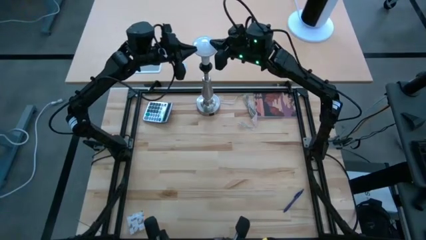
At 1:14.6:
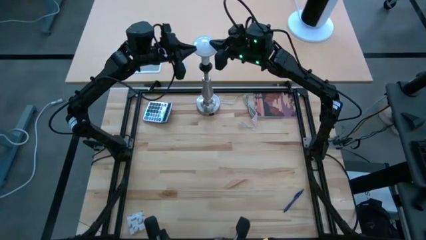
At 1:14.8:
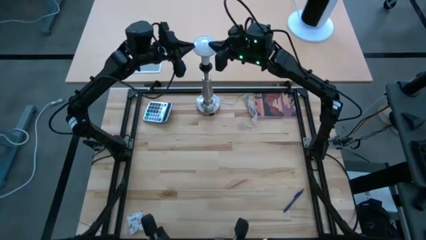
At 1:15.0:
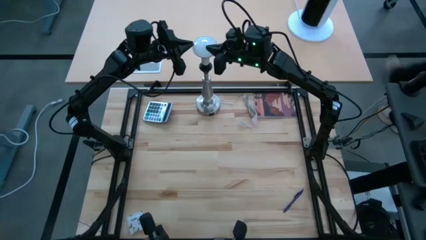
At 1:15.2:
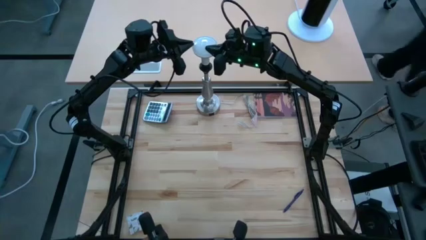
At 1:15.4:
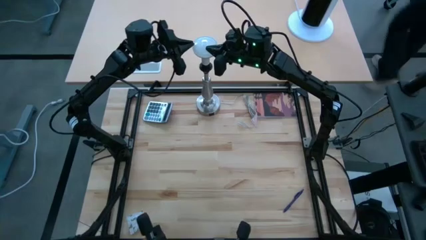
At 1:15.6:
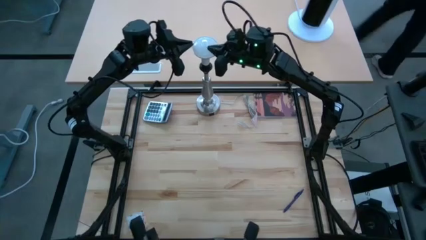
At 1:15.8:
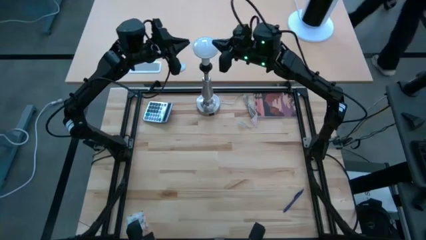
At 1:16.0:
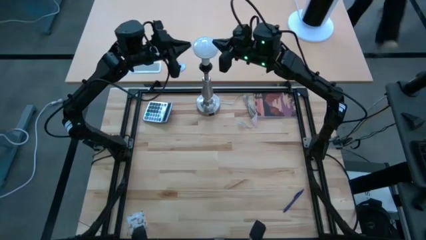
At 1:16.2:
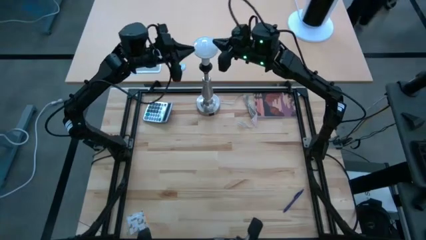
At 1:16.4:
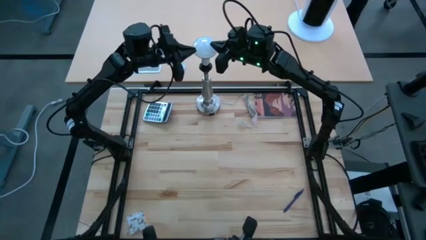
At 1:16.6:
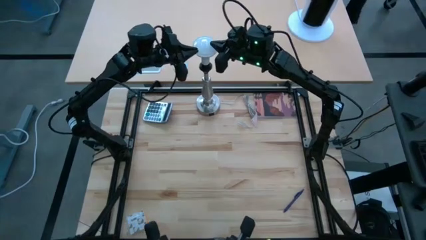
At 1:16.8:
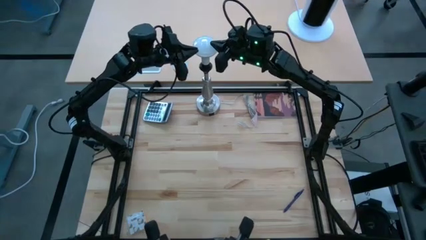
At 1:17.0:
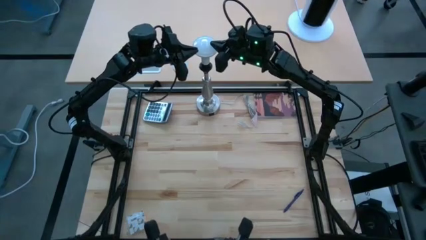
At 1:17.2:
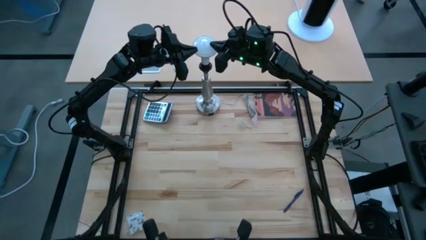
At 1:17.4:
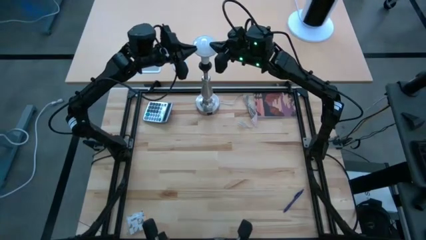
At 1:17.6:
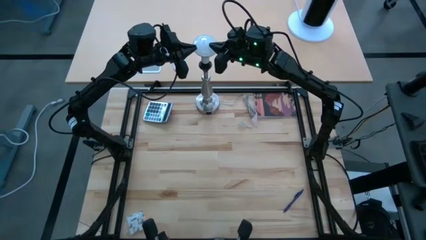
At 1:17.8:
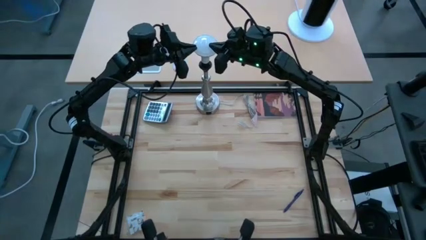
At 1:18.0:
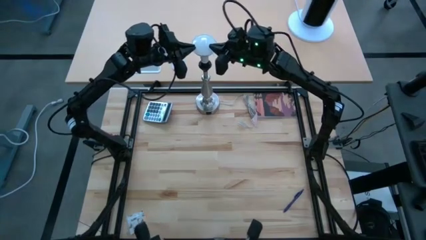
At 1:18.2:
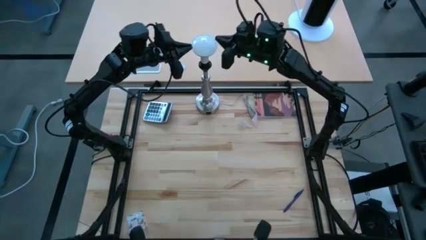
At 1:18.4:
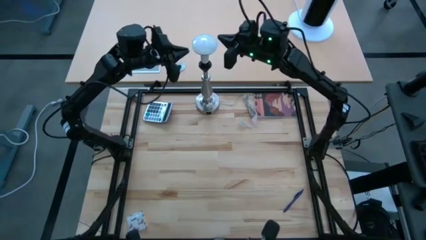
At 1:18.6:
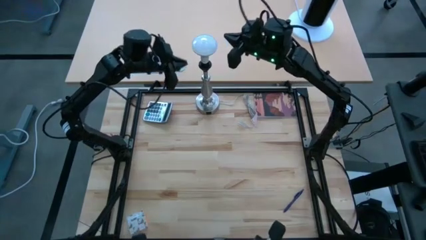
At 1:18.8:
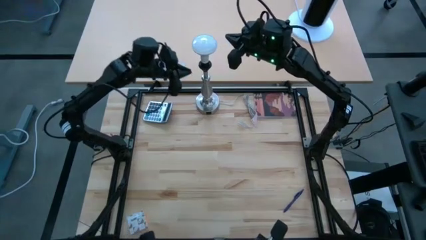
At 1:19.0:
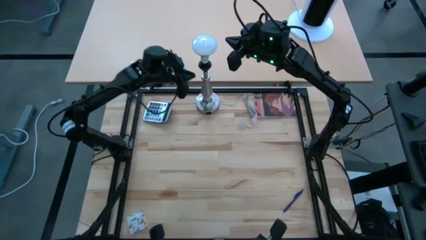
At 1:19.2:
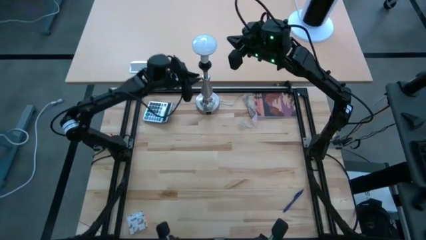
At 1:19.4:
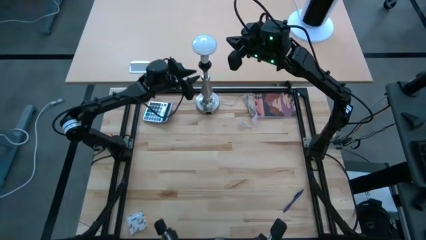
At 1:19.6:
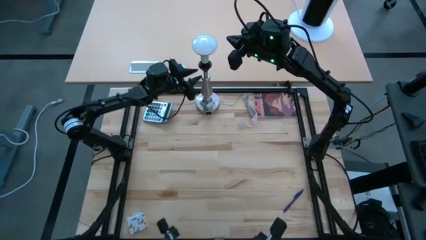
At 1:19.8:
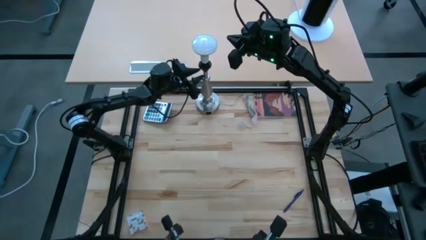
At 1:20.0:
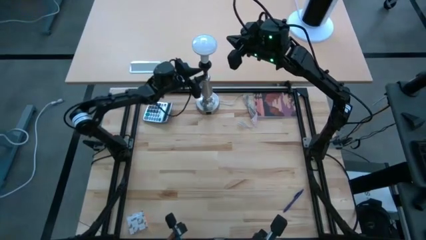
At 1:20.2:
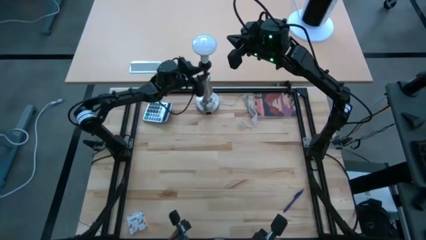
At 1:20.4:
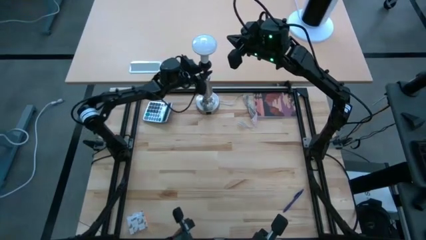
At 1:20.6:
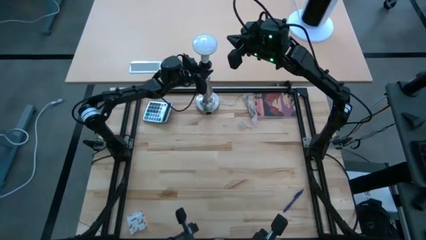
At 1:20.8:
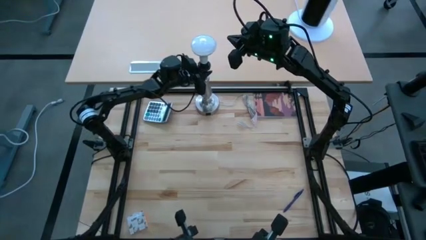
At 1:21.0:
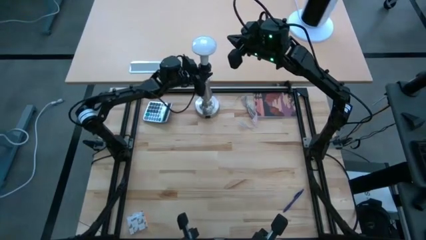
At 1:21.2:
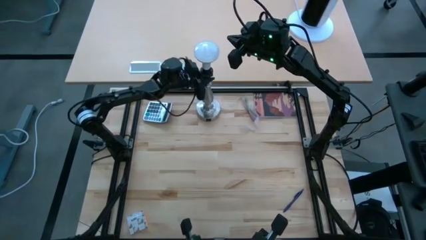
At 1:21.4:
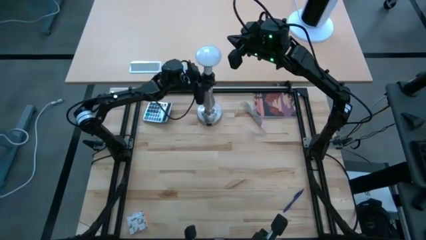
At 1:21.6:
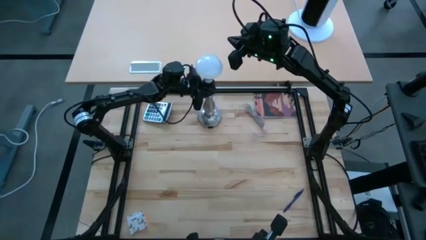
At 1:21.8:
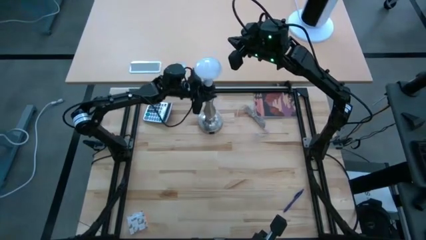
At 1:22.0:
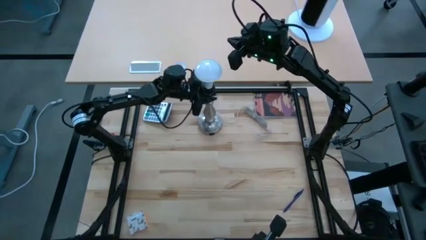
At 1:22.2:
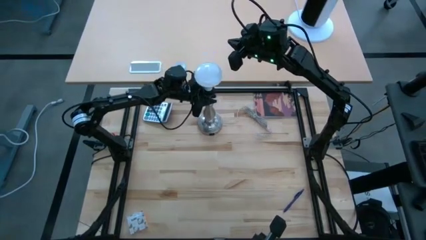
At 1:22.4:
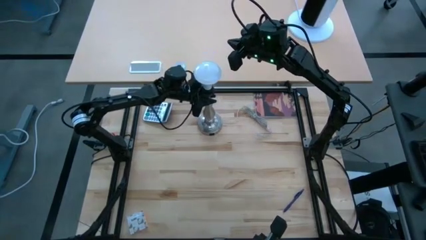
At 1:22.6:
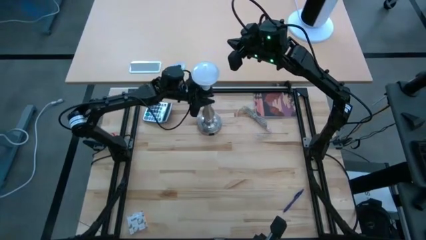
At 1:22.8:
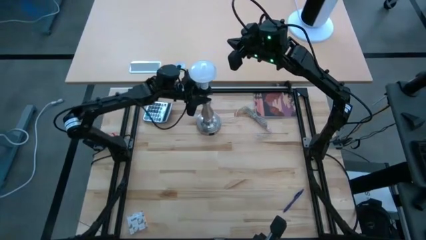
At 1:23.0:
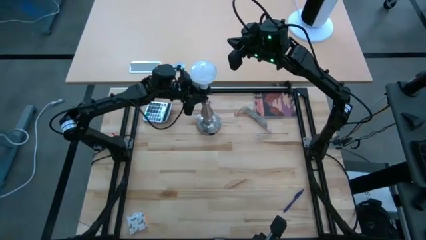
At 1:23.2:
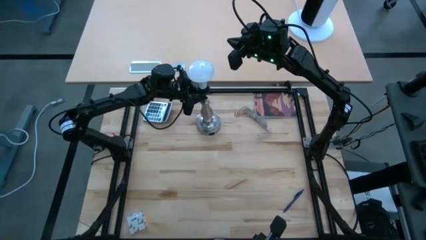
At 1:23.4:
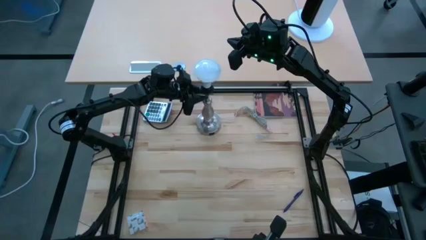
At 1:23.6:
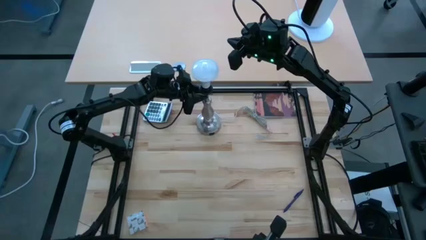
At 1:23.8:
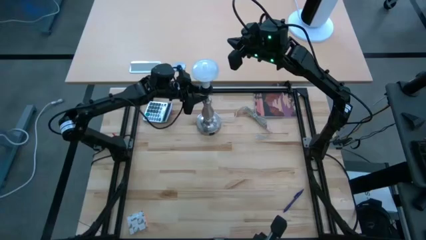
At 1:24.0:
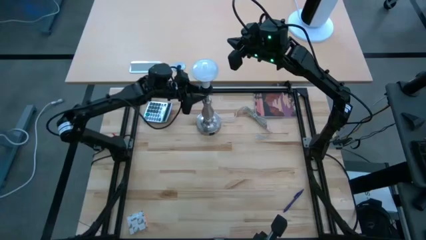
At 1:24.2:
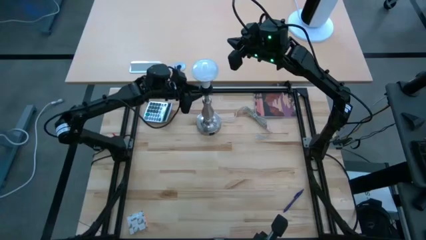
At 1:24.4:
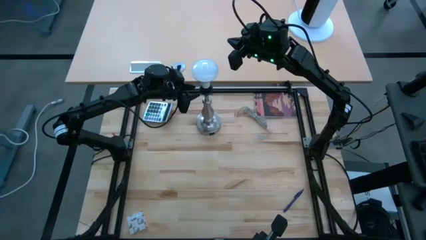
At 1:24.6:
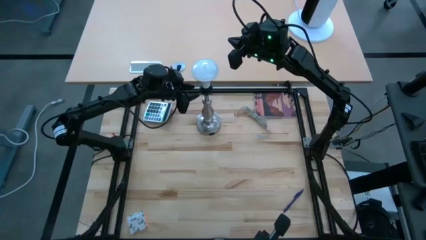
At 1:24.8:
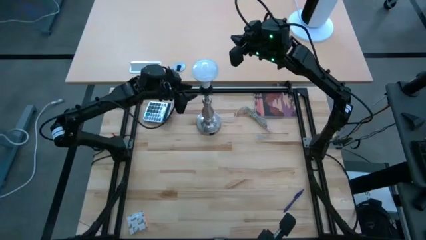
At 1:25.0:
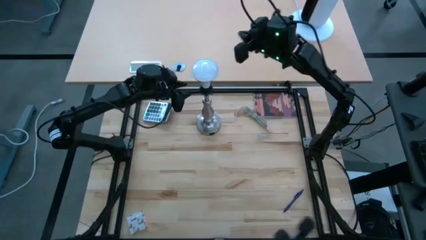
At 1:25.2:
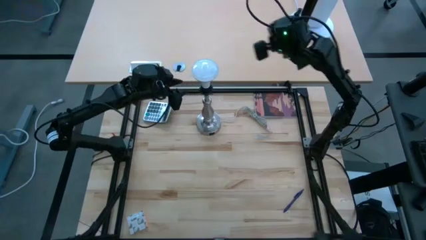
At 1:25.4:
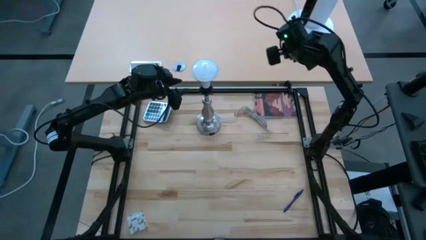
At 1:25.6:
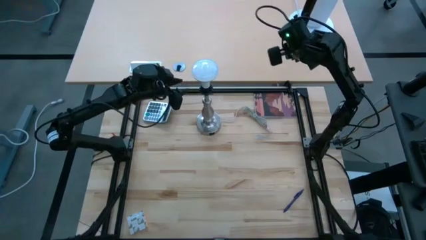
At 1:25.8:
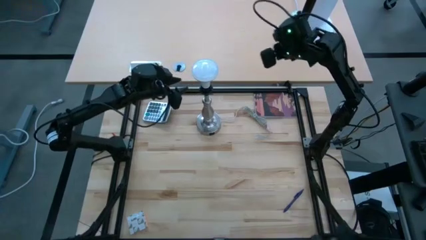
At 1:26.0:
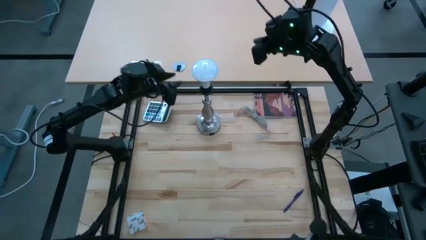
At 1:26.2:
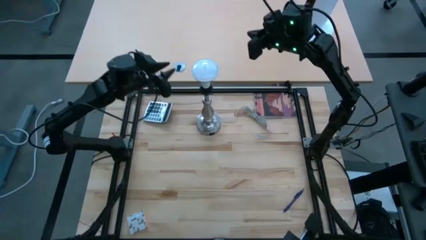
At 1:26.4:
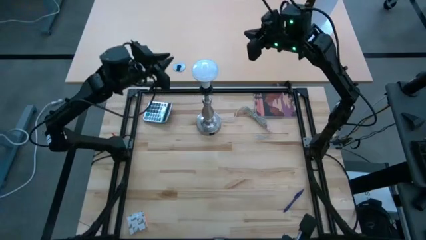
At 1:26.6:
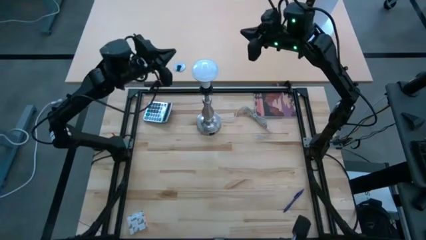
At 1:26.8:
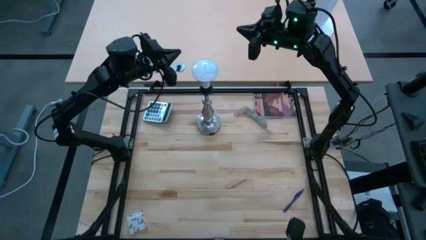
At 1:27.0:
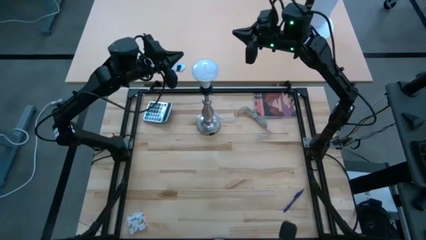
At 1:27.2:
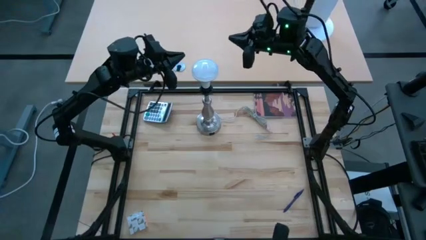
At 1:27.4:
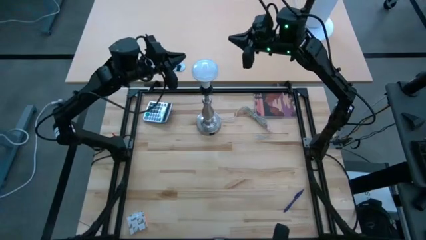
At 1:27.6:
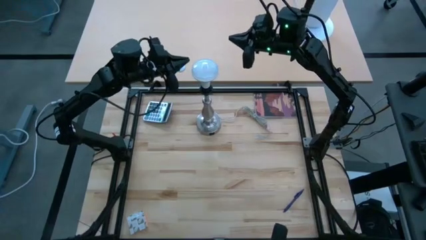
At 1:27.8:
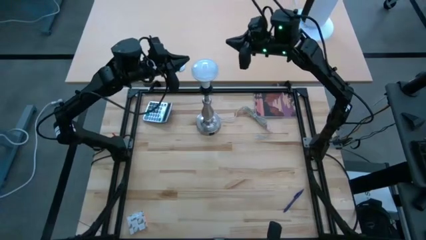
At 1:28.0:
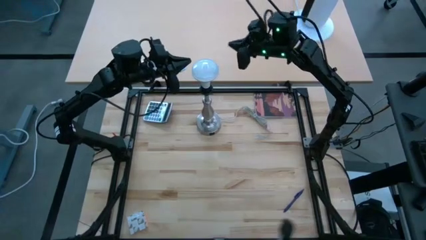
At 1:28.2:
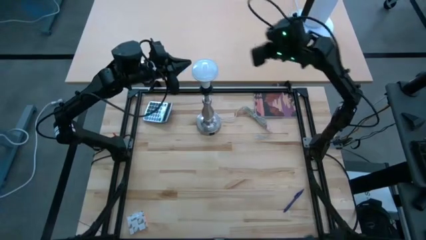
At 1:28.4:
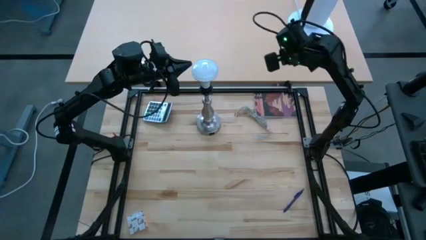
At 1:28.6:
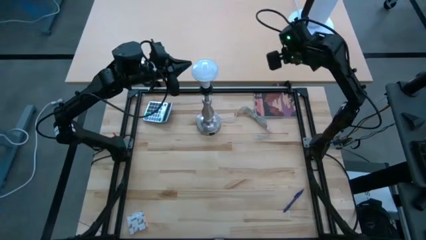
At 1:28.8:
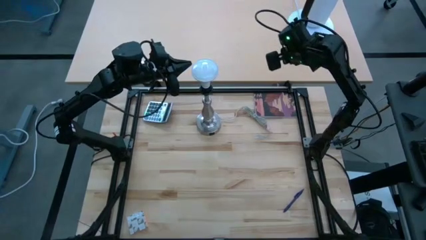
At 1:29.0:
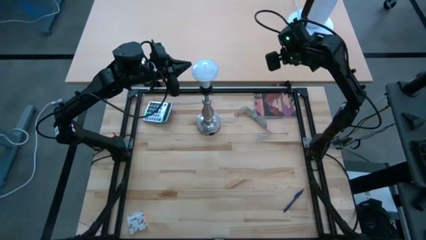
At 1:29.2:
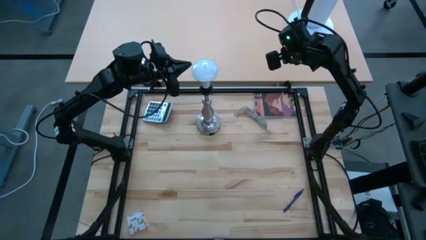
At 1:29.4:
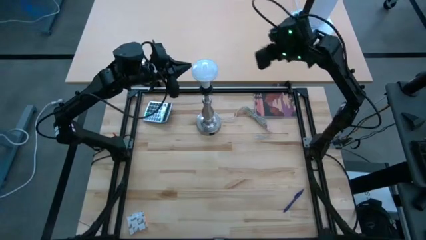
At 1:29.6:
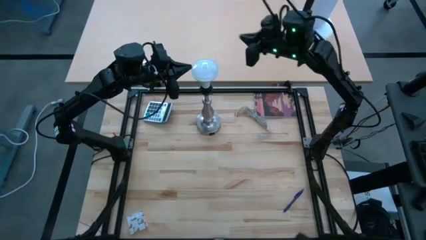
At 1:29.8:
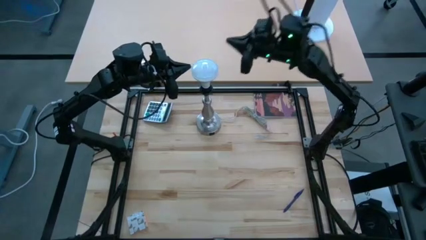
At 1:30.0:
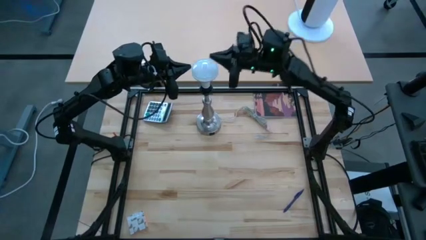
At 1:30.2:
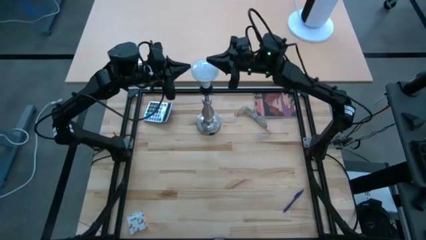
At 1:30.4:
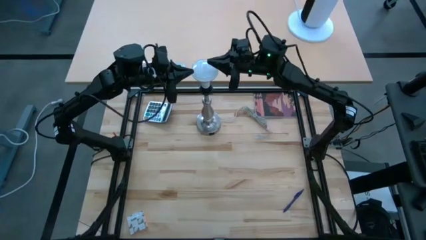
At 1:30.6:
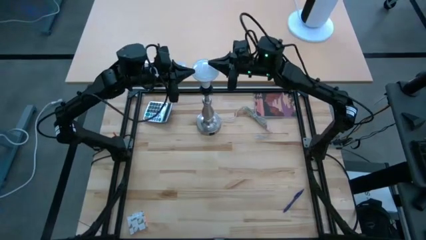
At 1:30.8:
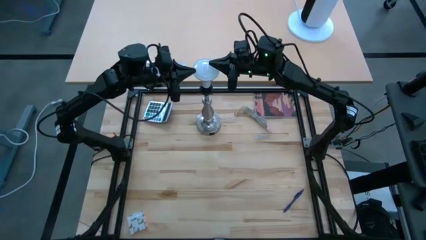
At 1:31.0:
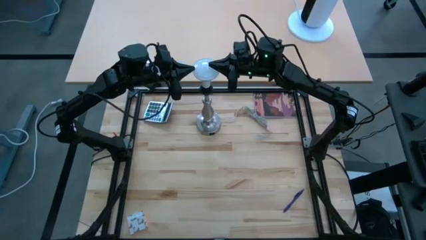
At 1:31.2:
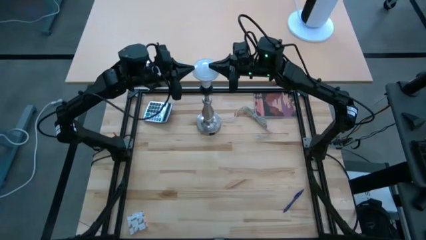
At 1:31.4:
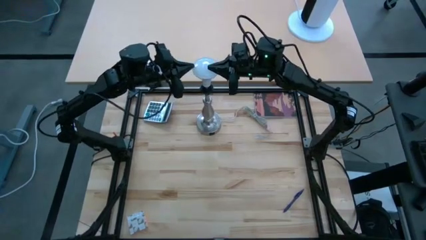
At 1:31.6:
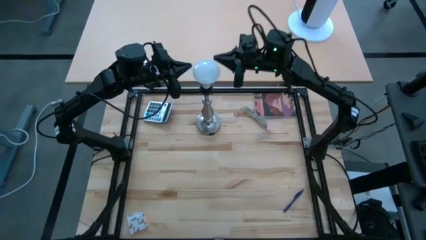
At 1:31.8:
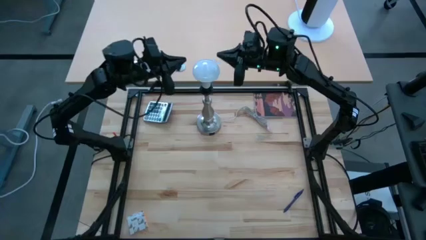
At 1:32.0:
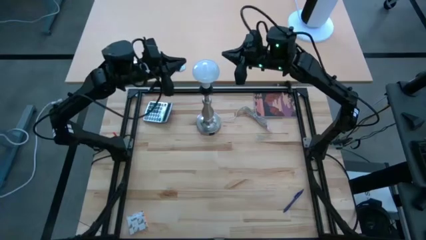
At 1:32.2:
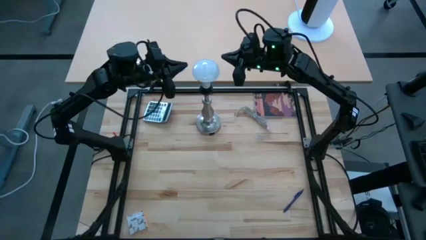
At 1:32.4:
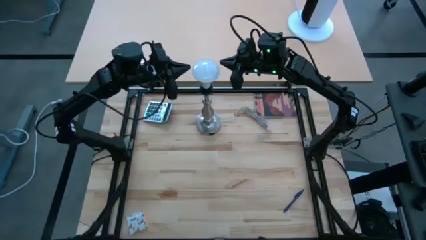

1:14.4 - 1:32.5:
Task: Screw lightbulb
Insert the lightbulb into the table lamp
